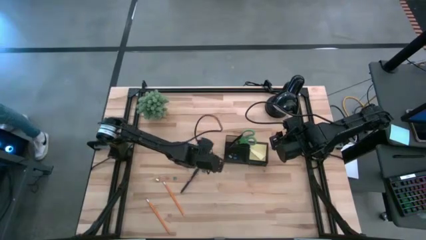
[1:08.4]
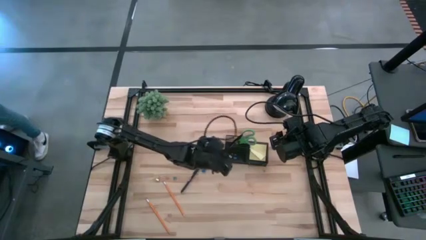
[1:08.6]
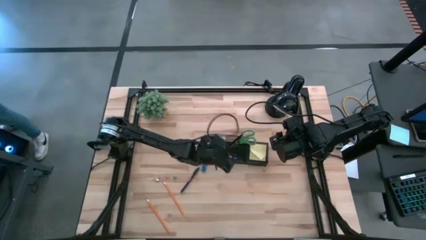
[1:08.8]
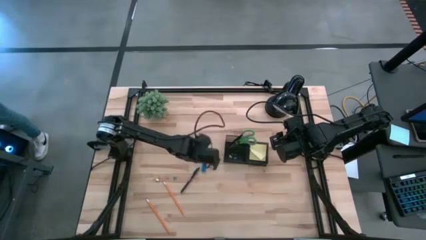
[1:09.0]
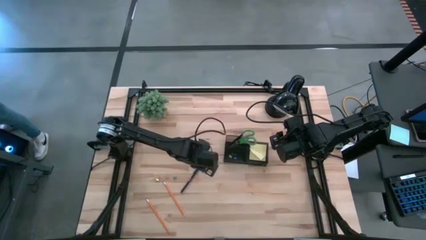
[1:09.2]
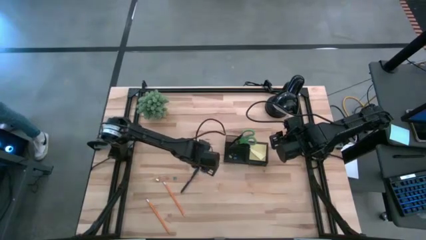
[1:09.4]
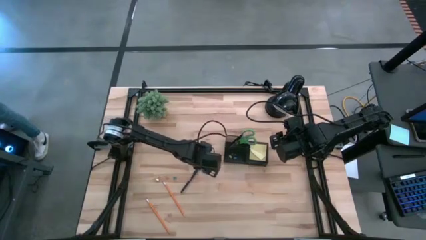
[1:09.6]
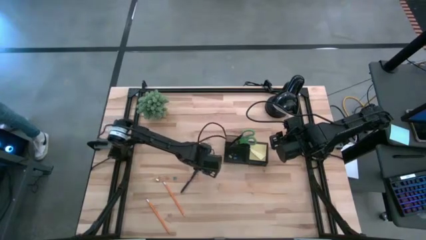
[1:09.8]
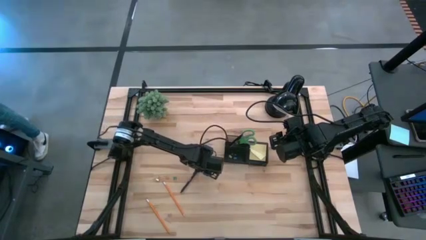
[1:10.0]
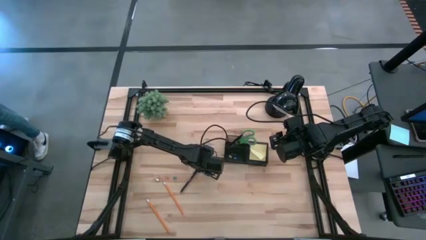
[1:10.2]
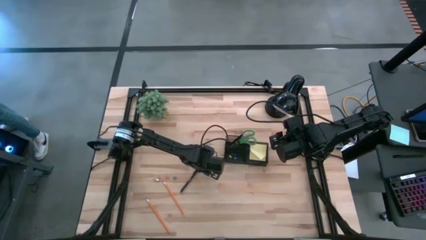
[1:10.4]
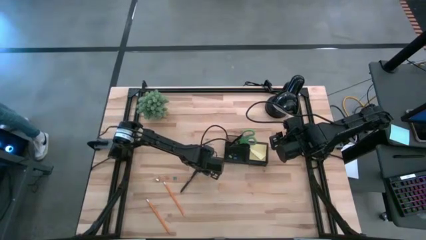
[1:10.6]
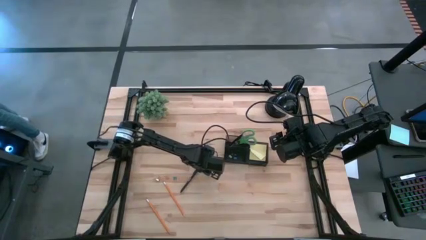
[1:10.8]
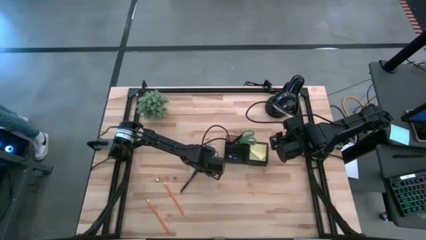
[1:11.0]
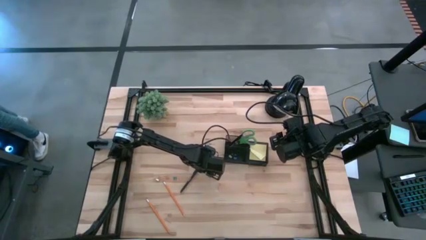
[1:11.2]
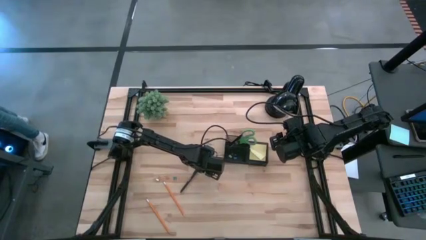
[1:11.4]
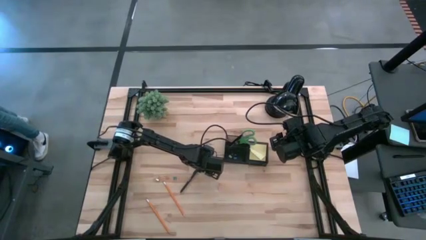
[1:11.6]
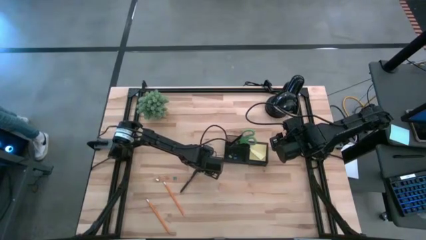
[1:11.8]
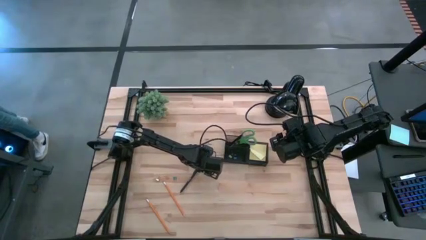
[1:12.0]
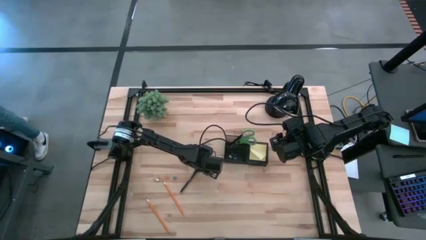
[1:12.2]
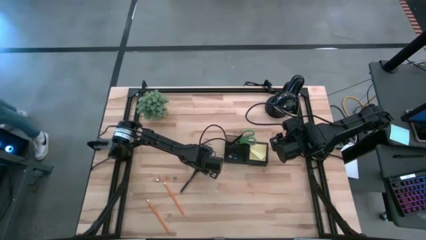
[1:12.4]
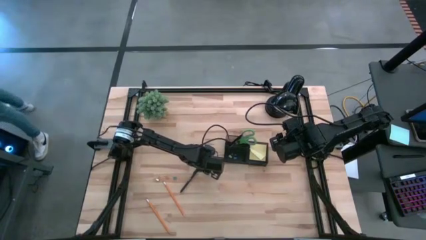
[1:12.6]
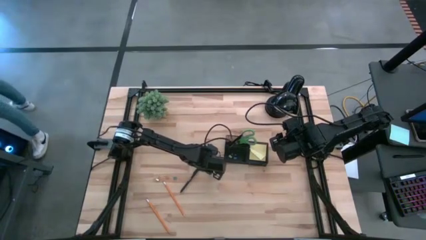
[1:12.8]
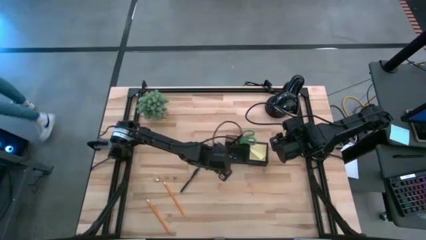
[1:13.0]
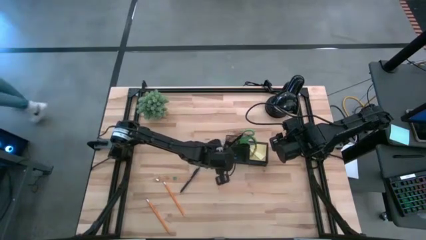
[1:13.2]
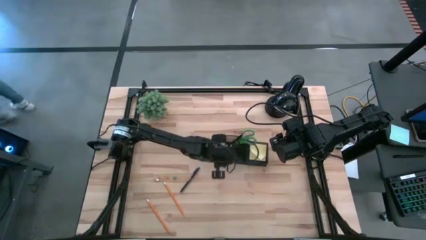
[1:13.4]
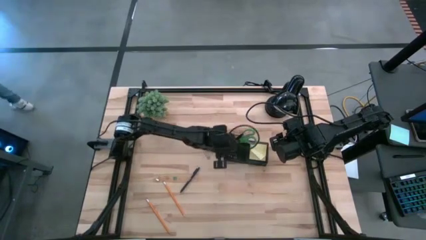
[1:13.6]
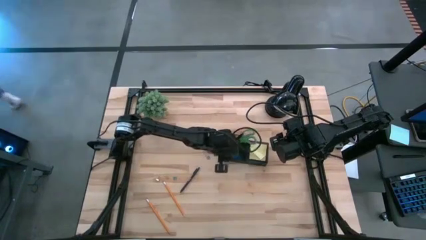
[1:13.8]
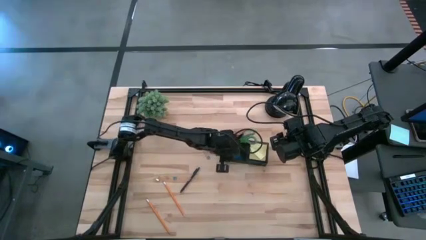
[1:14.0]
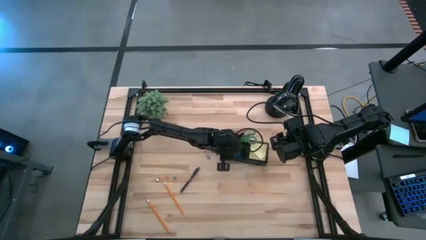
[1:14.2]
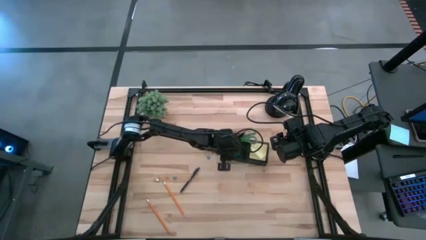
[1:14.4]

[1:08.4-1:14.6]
Task: Pick and place office supplies into organizer
Put the blue eraser into the black mesh organizer

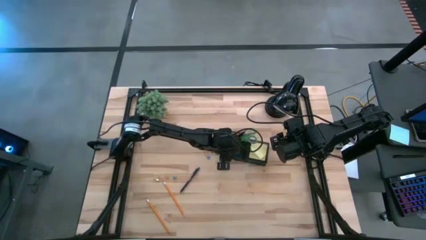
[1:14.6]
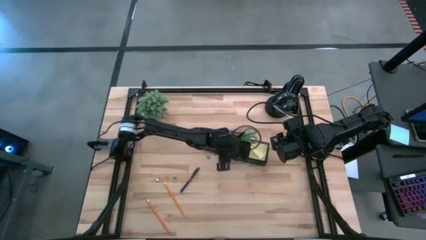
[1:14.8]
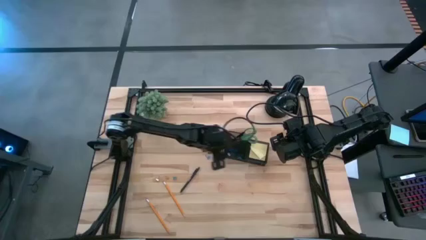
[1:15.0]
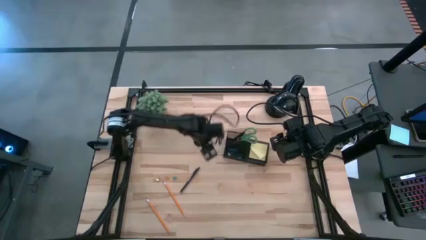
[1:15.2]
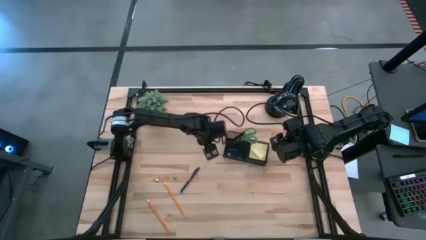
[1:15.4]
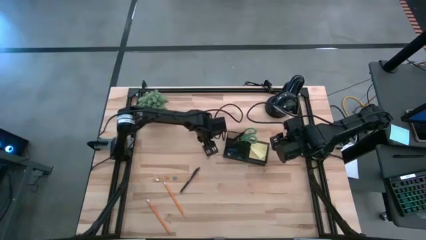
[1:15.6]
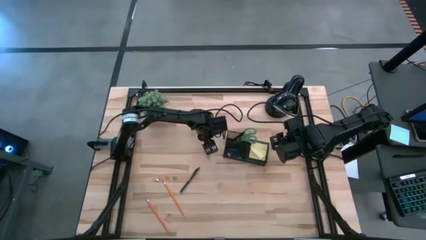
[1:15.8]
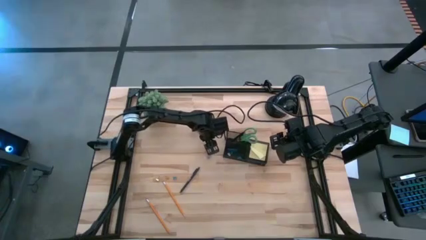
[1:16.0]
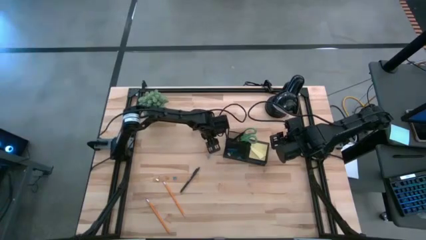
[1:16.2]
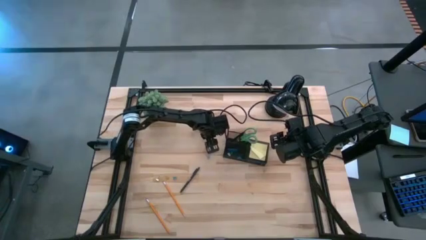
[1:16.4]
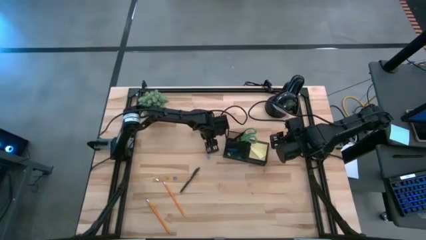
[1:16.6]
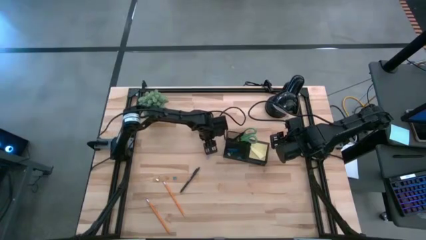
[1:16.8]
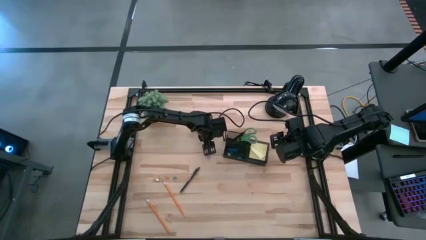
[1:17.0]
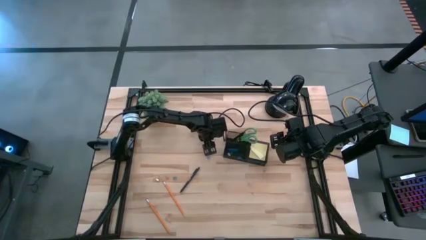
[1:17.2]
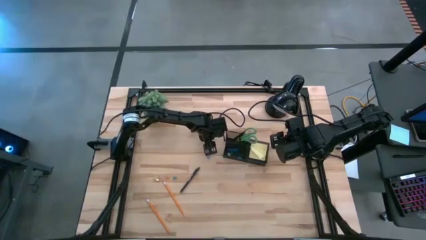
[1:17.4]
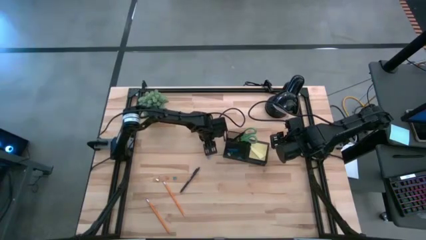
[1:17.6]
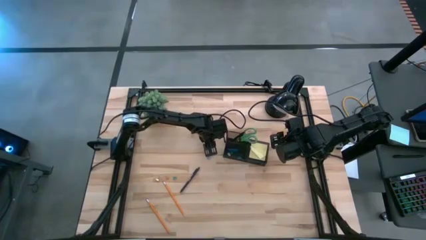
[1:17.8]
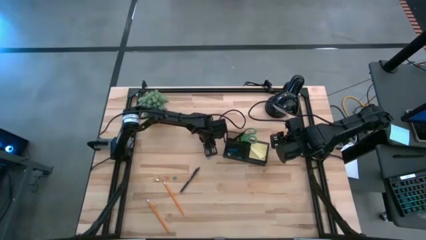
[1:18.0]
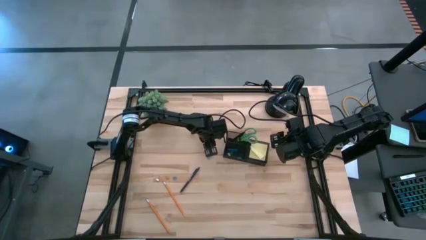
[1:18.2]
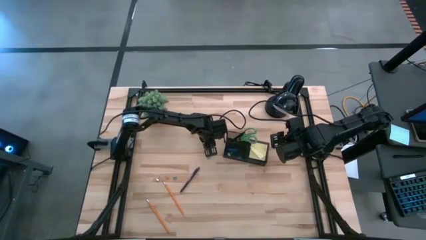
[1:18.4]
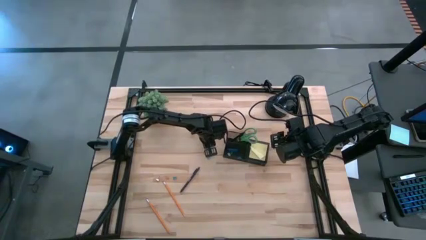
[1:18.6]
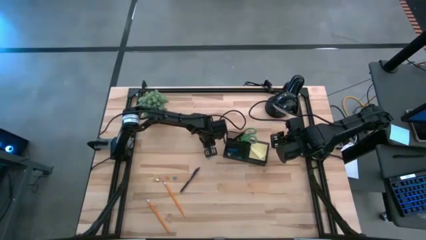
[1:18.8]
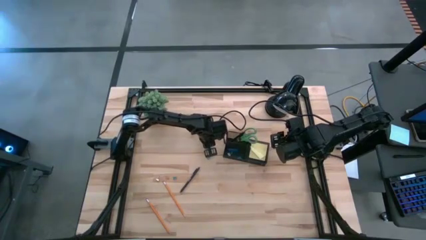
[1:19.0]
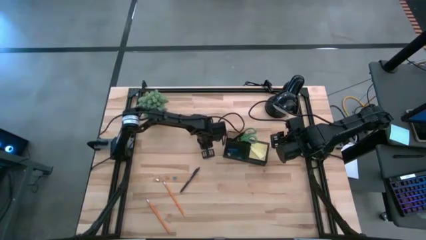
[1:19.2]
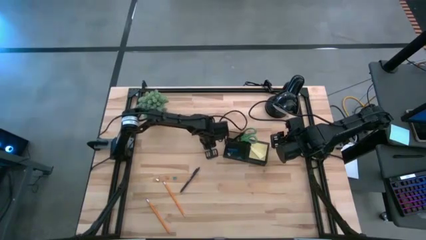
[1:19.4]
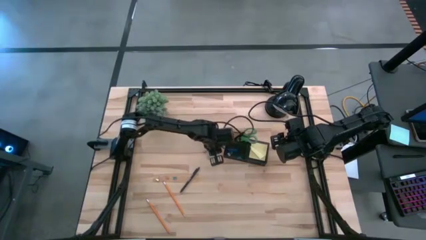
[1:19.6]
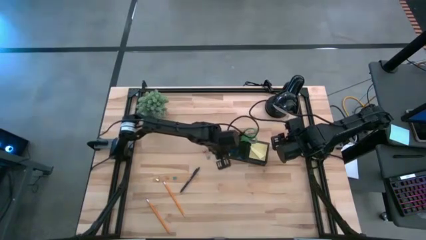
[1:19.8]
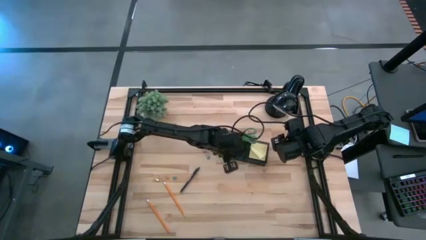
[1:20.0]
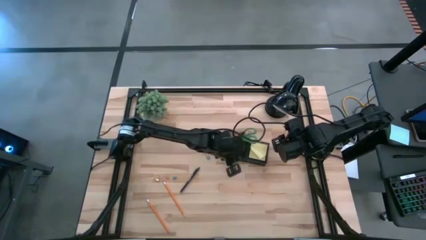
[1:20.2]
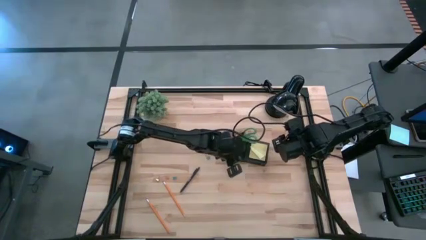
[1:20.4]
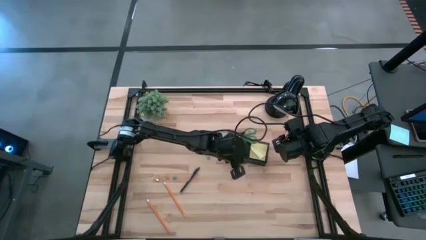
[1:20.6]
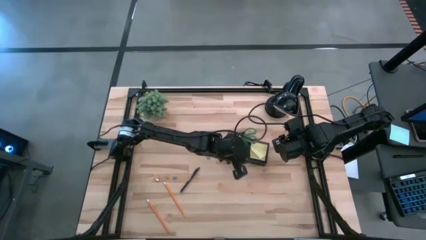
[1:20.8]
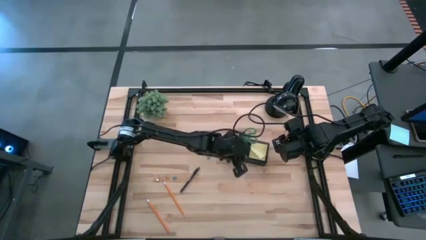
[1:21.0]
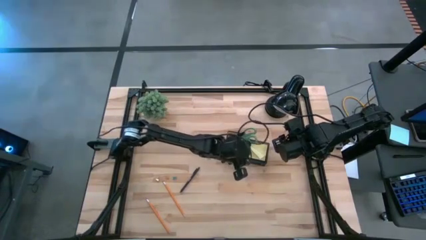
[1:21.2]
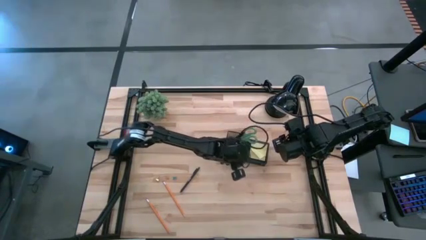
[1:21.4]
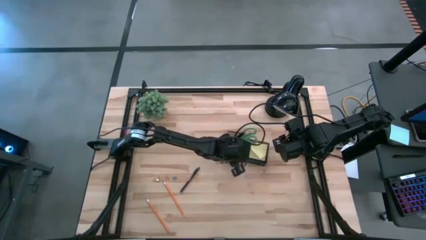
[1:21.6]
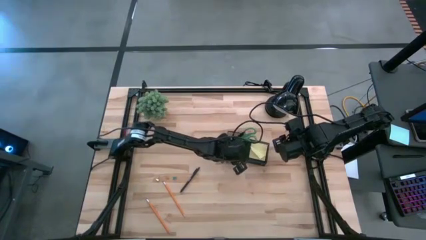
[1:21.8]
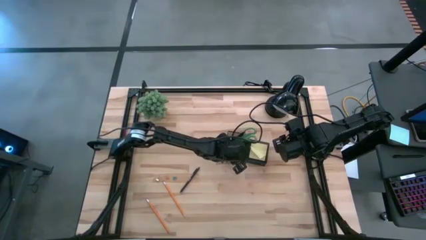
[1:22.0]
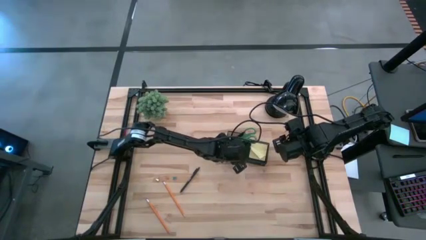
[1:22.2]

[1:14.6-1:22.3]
Put the right yellow binder clip into the black mesh organizer

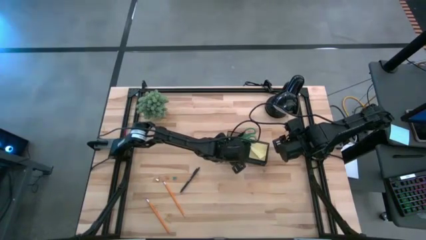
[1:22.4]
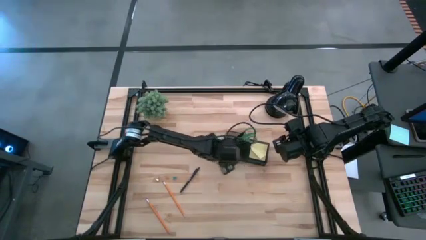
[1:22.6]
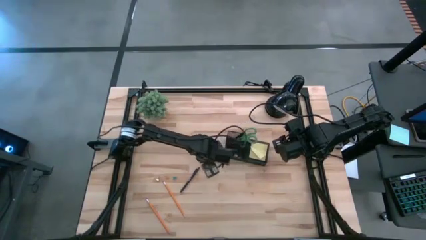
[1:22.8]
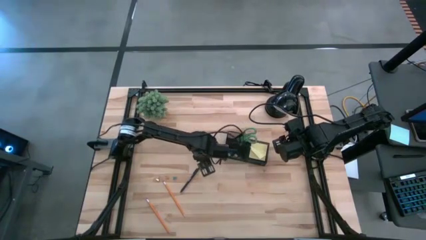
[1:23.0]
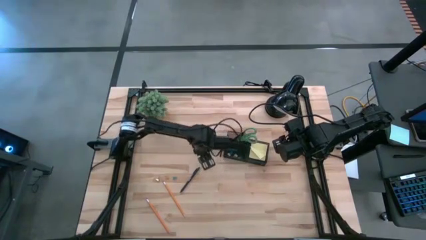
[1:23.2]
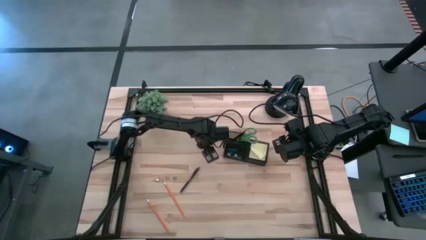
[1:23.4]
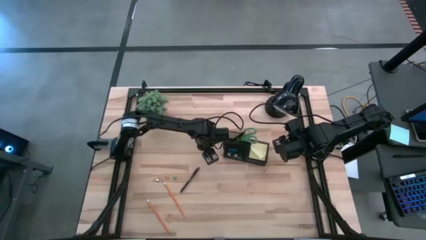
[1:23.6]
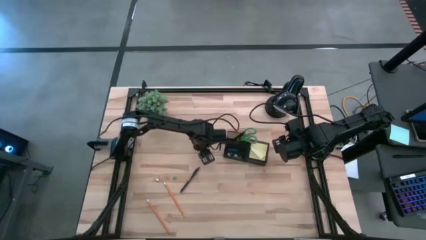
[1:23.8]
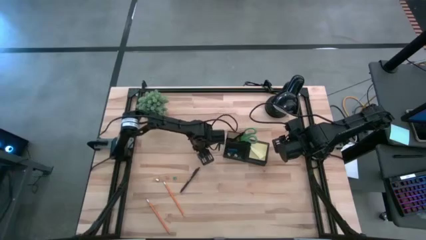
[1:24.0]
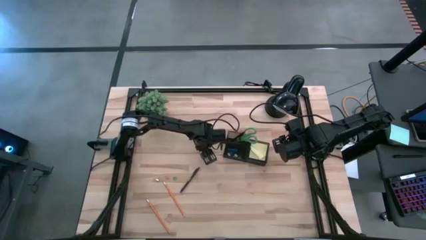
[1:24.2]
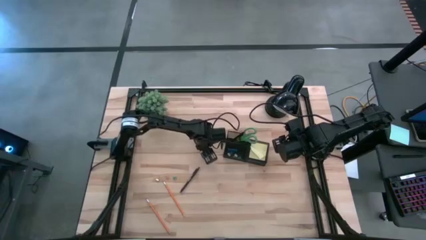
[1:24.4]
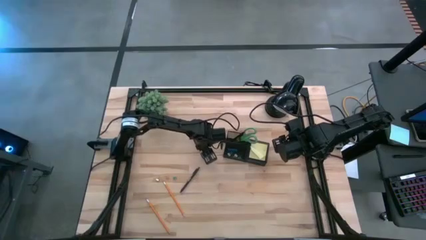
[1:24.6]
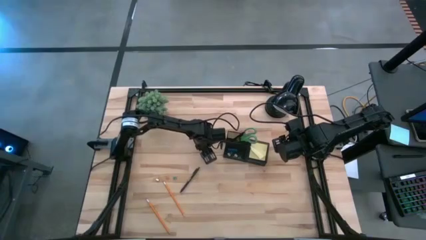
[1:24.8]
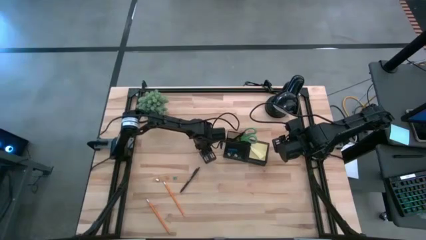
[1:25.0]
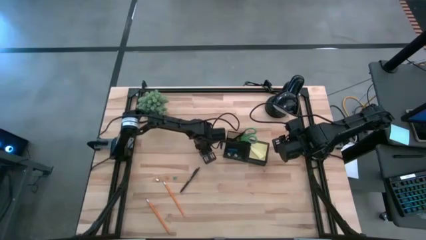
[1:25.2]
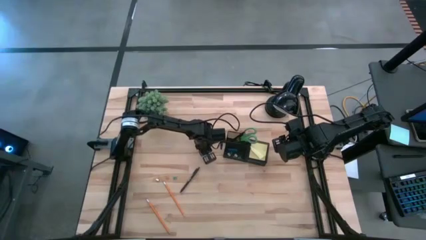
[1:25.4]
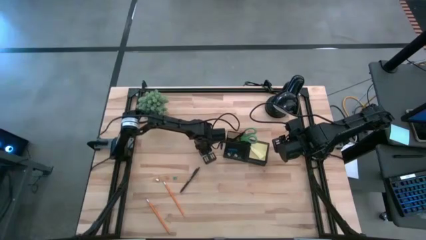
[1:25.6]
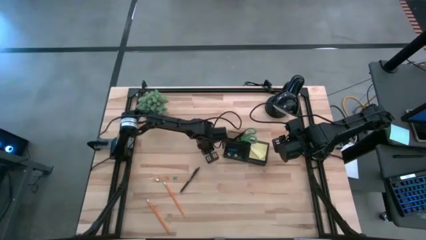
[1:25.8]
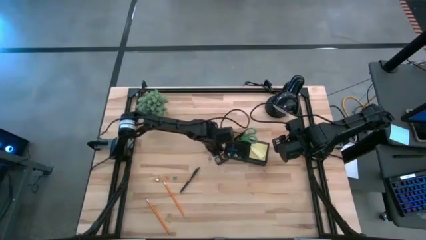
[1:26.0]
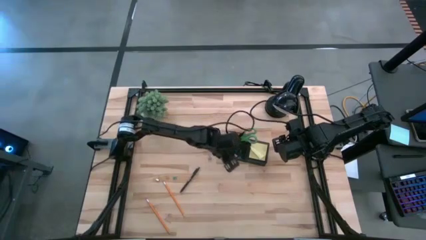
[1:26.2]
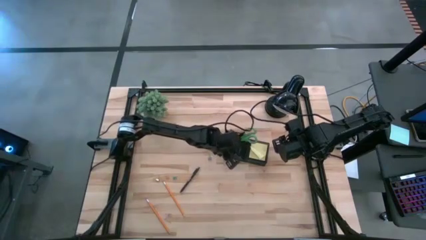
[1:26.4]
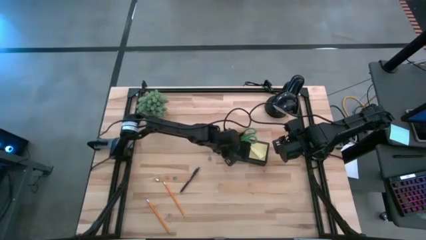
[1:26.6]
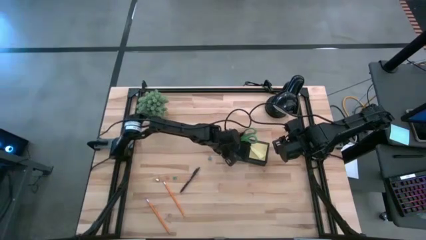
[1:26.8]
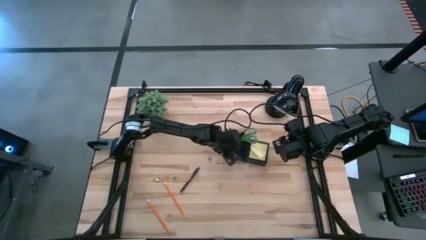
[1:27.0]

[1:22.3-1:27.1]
Put the pink binder clip into the black mesh organizer
